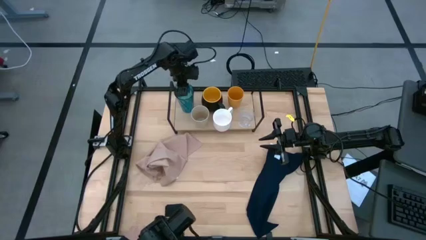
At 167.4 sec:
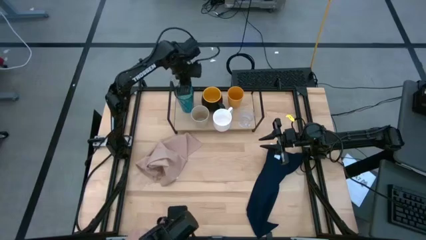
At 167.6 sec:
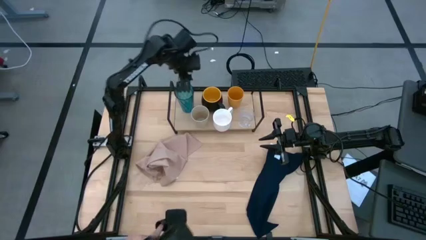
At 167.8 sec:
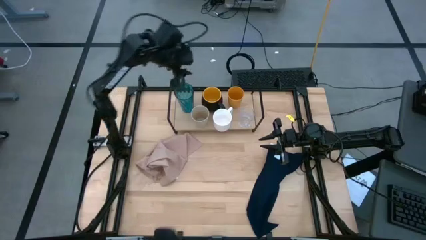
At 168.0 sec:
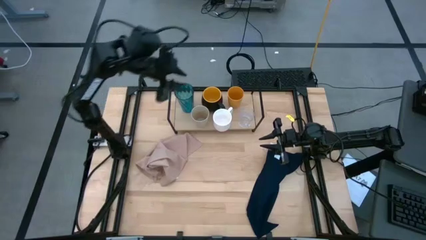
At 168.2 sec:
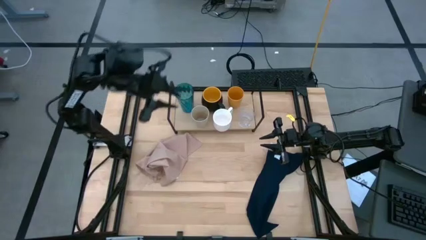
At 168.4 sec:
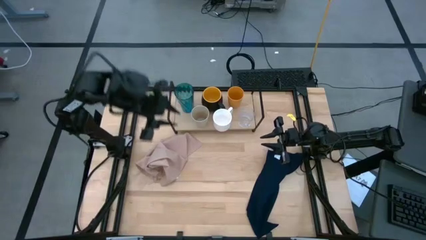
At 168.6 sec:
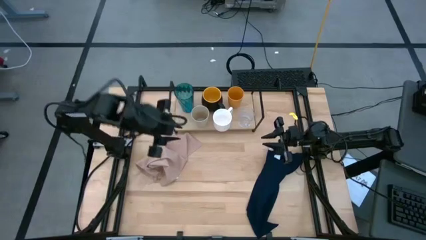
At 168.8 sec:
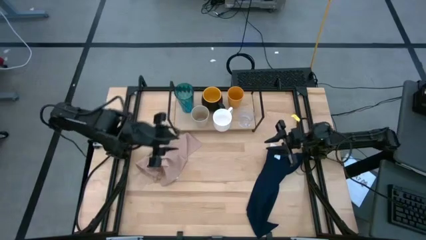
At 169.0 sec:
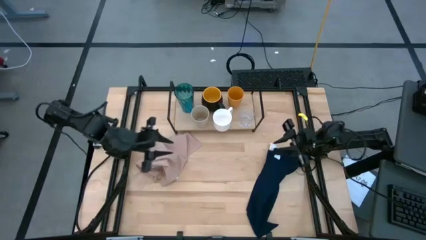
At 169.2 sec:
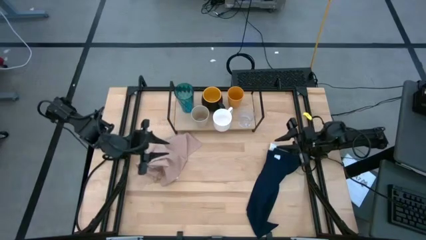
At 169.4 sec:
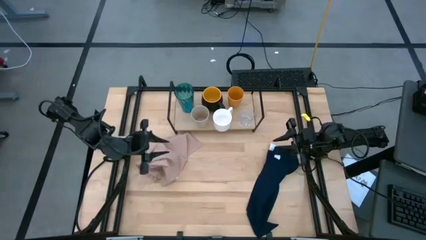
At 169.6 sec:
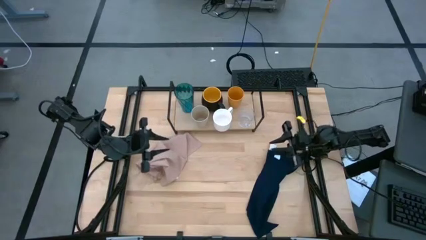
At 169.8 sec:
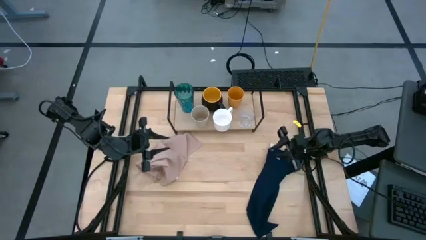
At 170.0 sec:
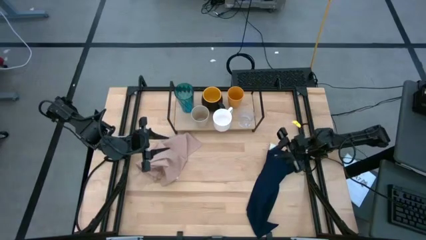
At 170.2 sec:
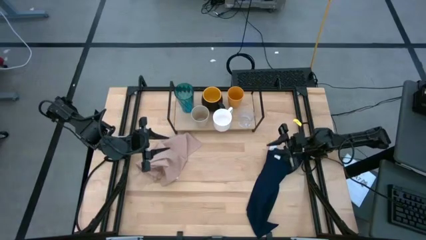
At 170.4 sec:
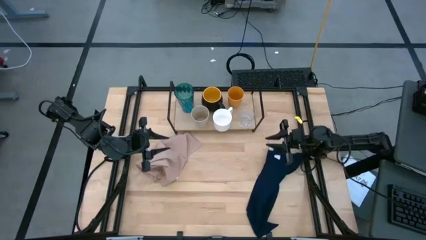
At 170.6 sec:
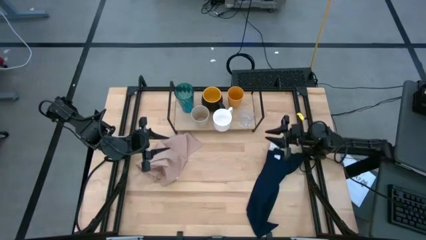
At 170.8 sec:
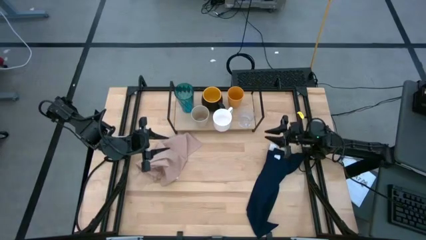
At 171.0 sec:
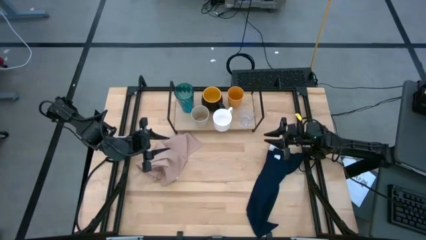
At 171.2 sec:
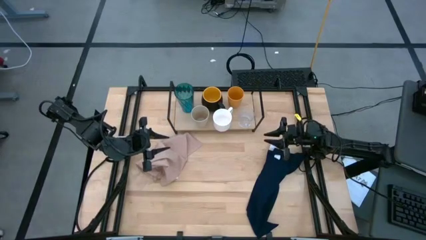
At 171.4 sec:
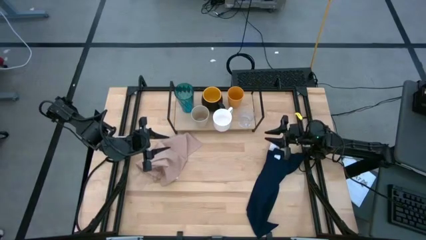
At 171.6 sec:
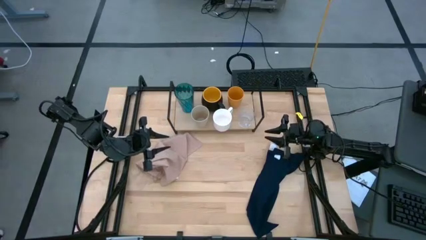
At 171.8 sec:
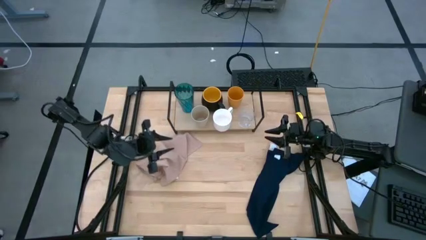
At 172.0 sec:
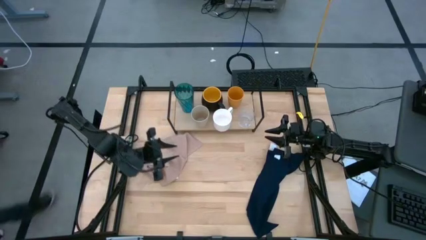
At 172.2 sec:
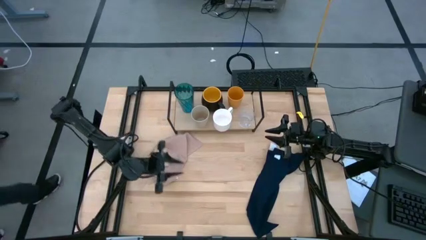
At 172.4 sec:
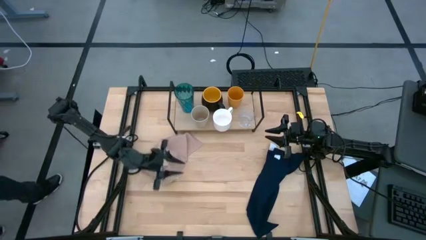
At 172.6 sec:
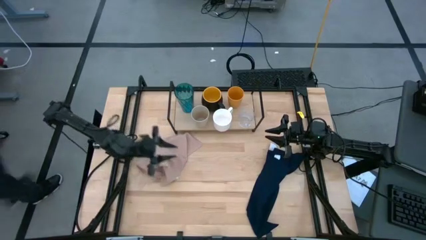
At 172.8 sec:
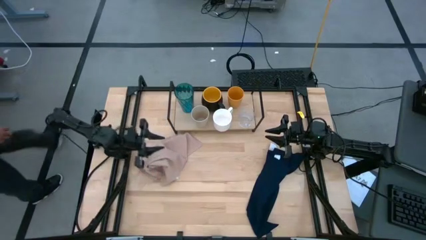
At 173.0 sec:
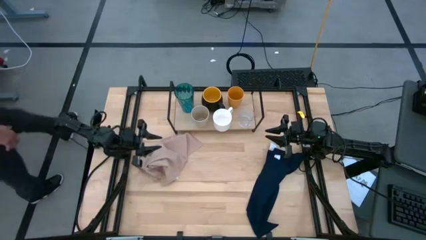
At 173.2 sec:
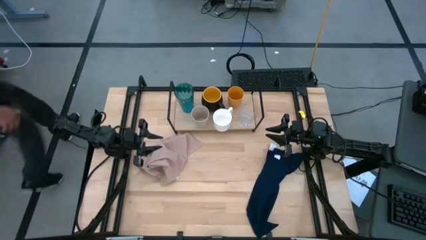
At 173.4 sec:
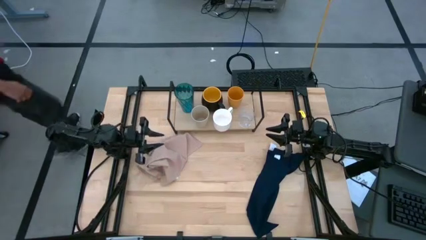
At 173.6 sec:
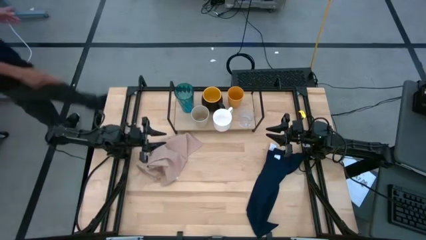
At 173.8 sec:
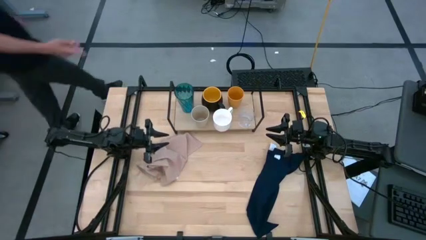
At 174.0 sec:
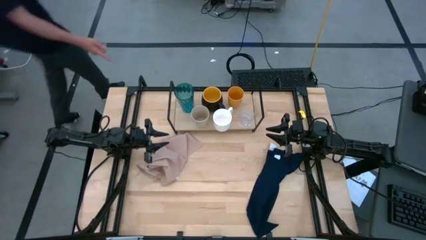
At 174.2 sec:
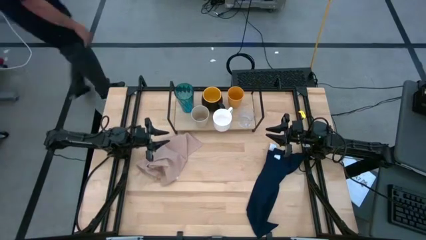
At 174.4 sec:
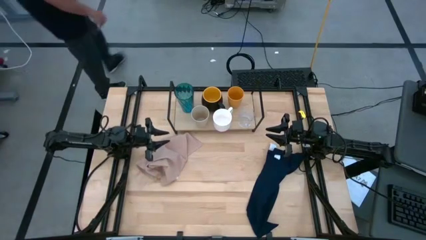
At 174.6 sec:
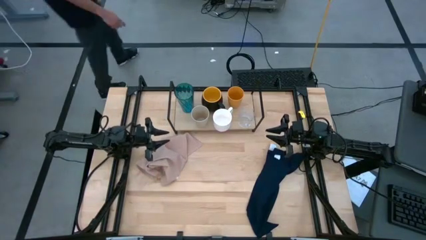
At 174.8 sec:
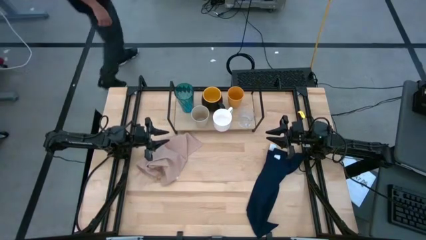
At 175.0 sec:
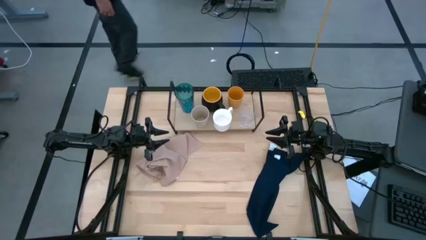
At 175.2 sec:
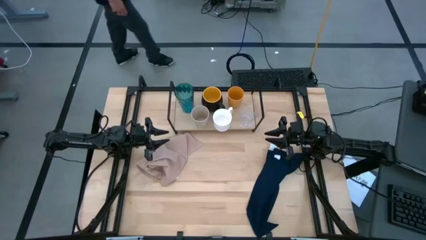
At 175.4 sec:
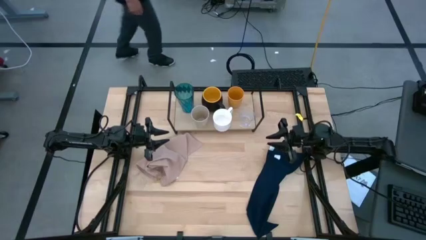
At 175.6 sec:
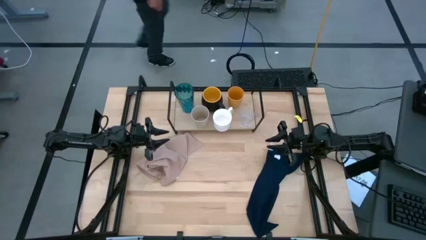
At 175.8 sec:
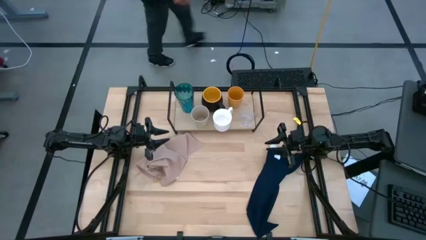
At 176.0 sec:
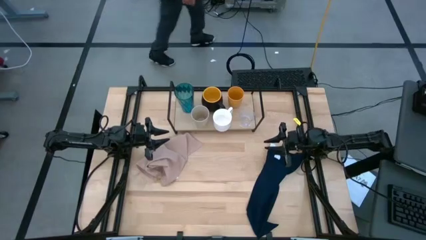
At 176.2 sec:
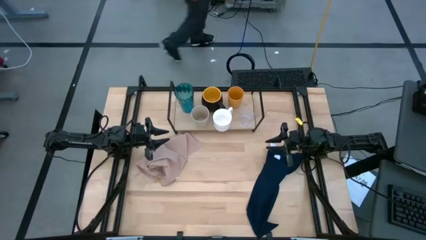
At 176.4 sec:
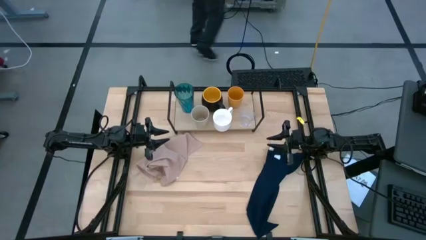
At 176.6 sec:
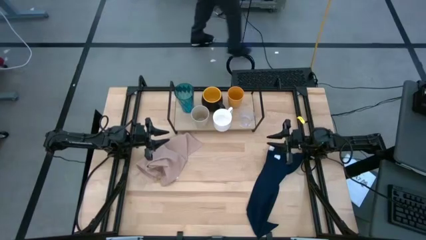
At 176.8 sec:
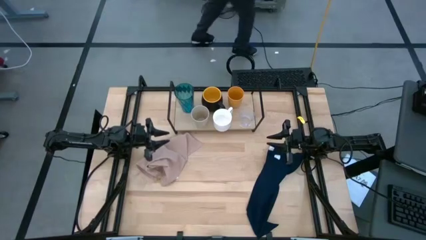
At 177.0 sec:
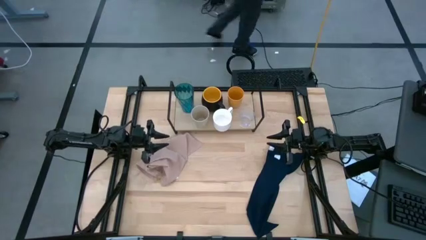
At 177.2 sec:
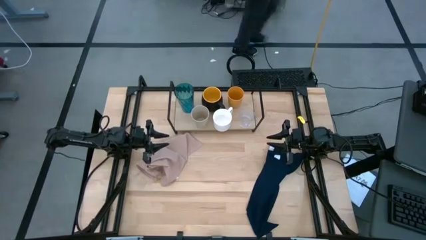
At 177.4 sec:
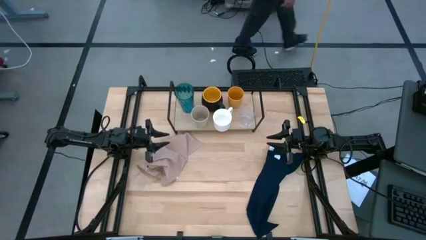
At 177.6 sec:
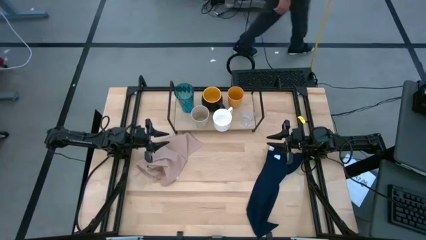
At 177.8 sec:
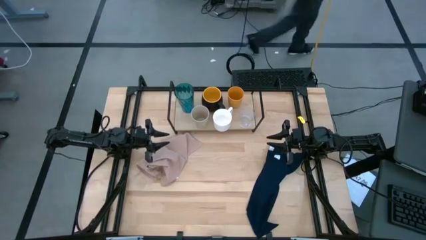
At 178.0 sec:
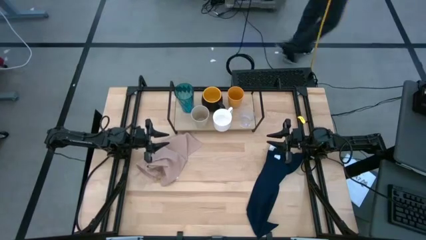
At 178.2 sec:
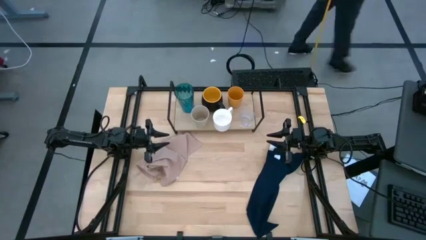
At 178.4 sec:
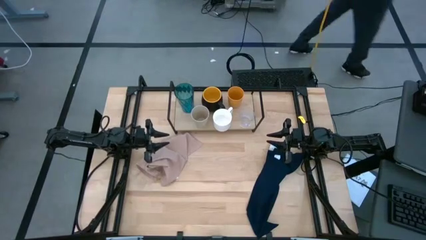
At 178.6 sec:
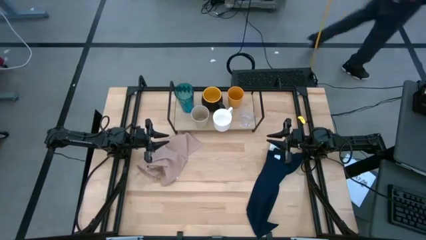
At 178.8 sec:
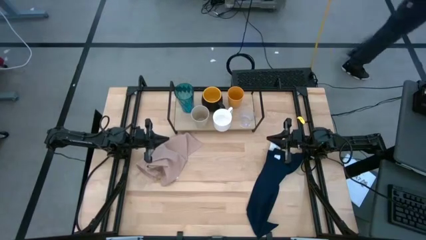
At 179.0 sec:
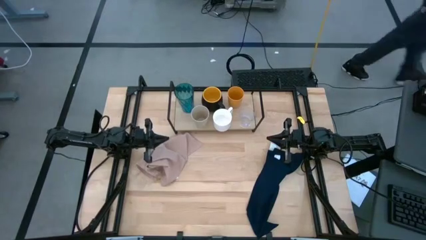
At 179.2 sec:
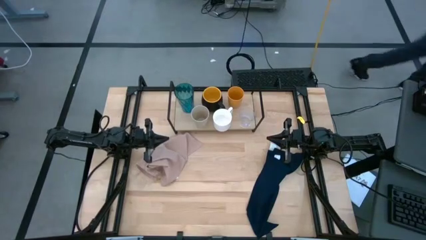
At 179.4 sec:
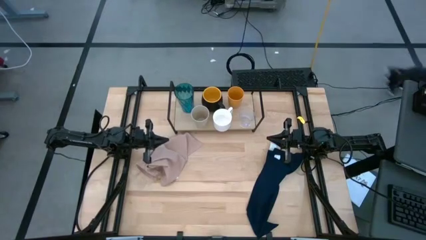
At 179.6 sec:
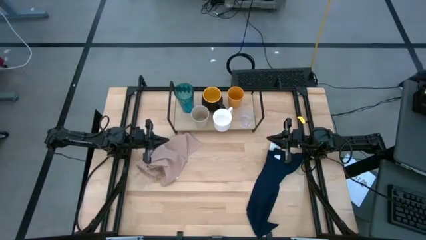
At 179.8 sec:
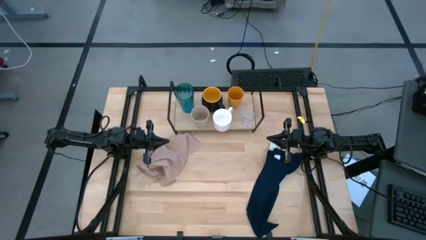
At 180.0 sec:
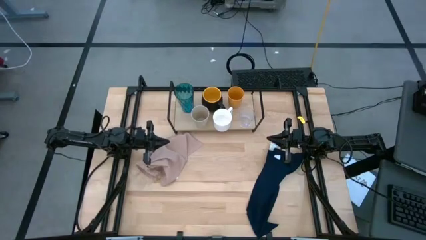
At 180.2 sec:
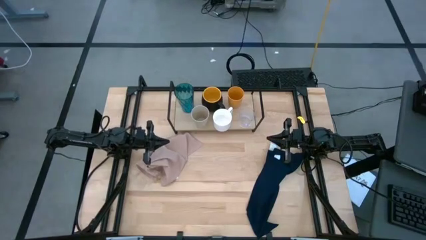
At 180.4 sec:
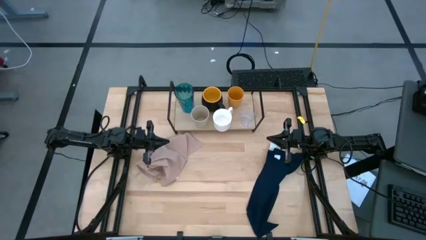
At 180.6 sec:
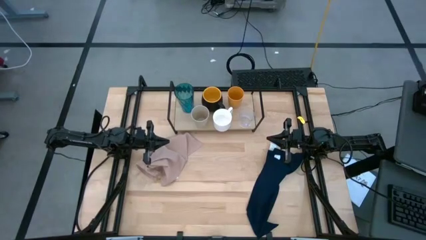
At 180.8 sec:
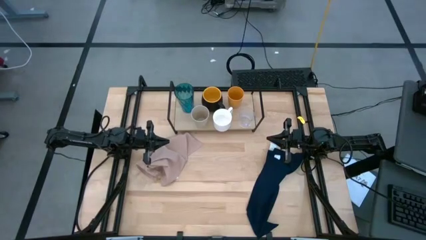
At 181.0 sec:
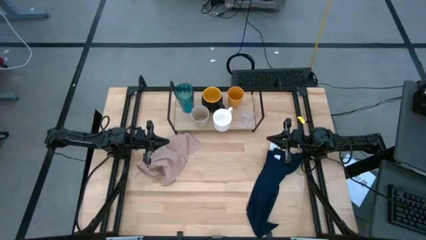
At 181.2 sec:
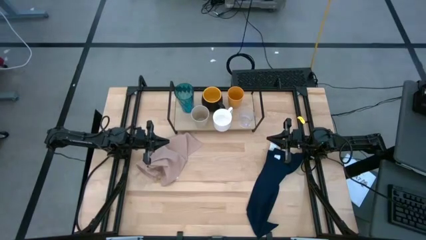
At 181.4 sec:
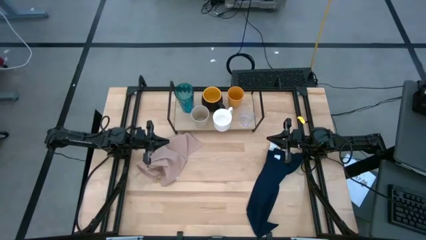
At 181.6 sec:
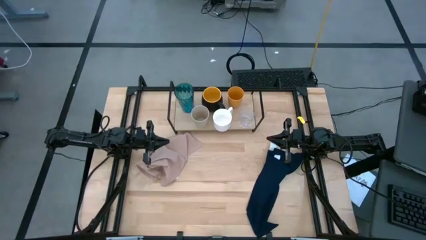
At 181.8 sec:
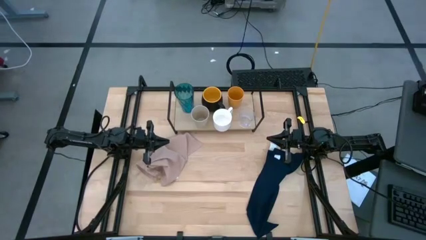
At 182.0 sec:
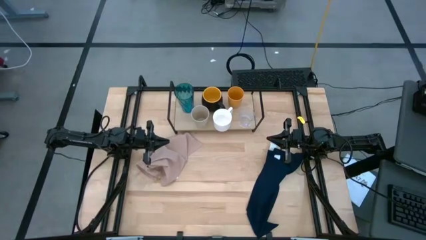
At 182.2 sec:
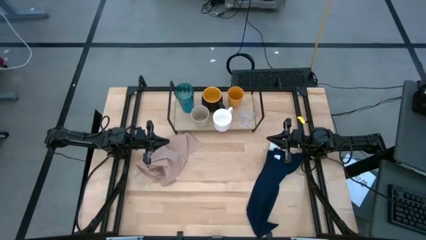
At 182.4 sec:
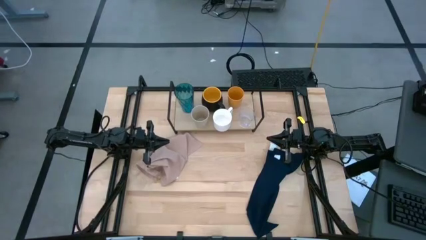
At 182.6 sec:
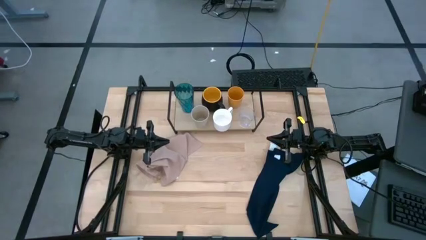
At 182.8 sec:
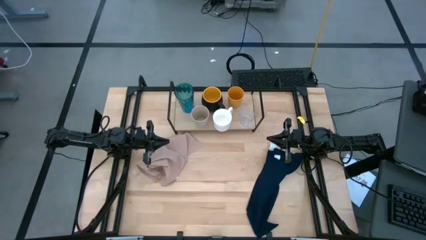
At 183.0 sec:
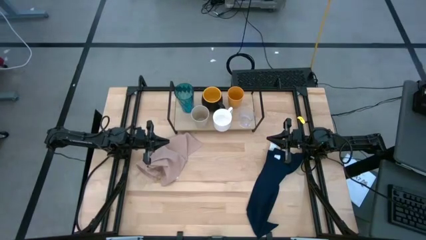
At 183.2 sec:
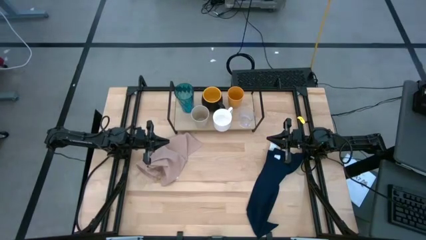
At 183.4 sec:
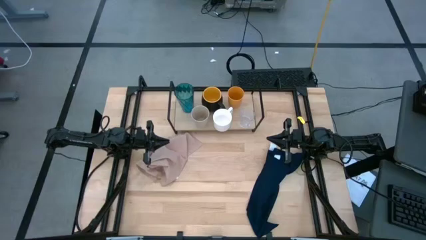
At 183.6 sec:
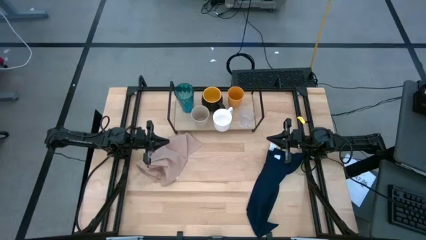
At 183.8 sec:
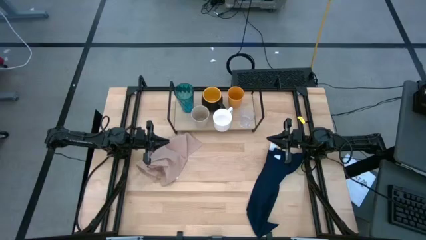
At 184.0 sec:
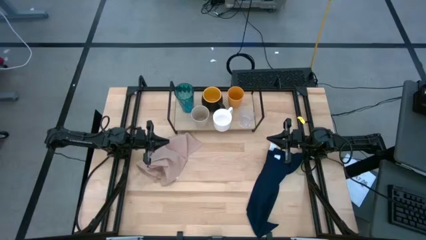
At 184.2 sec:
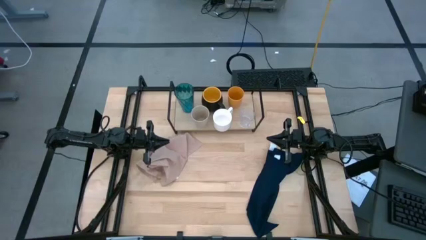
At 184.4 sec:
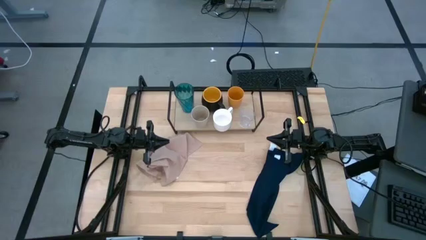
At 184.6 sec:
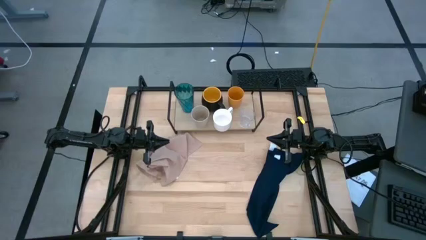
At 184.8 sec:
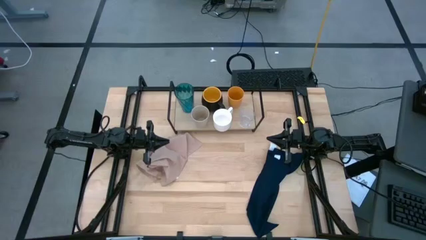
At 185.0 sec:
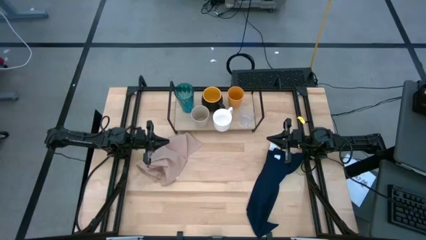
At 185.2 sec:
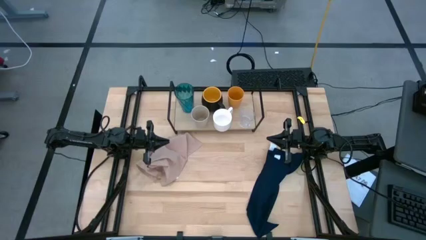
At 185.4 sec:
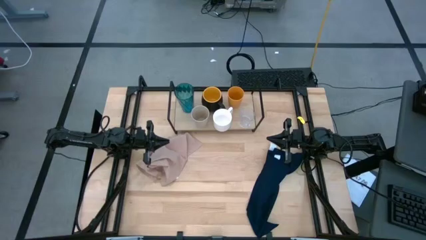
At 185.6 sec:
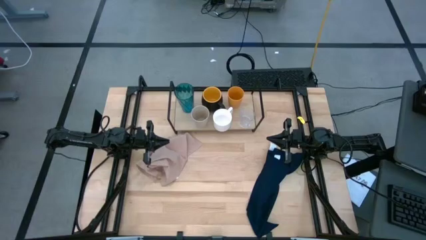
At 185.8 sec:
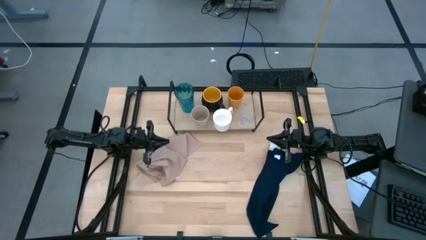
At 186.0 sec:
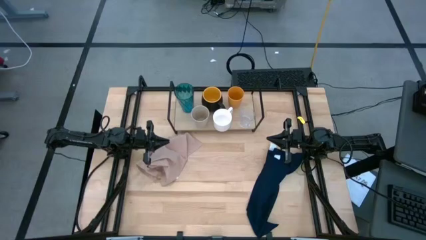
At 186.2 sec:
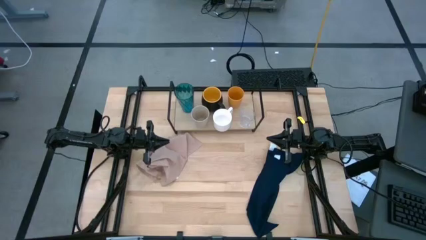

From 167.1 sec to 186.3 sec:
Task: Stack small to large cups/mugs on shelf
Return to Home Position
